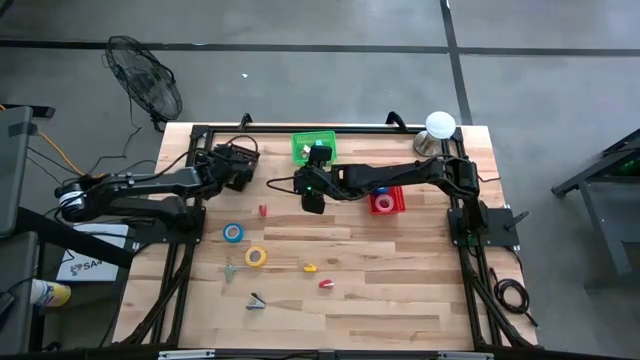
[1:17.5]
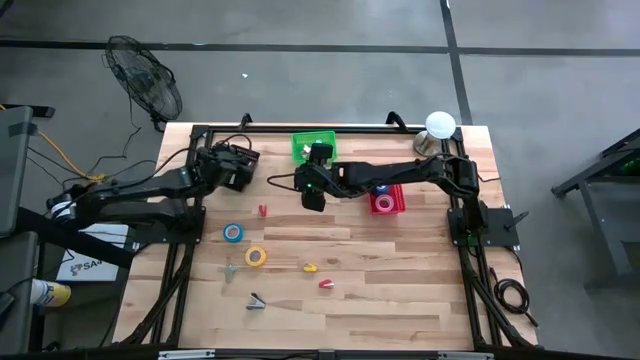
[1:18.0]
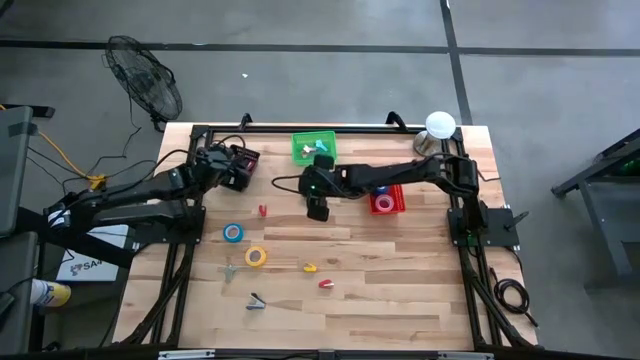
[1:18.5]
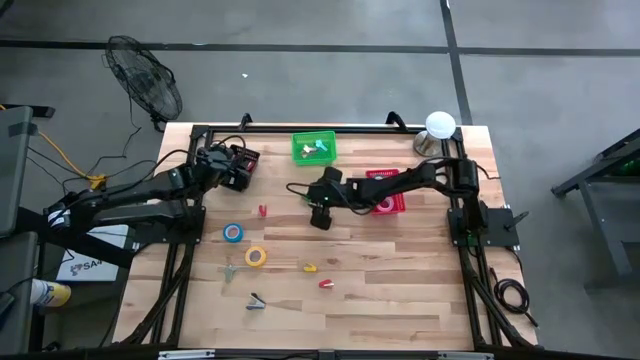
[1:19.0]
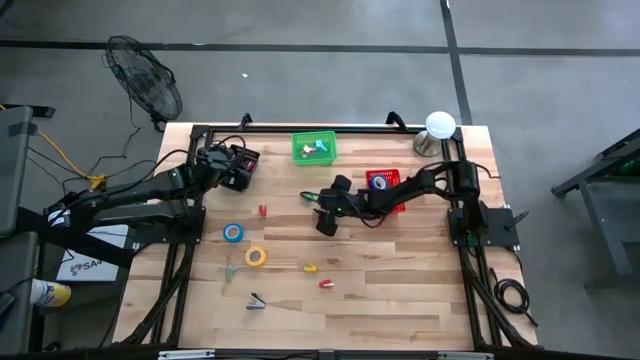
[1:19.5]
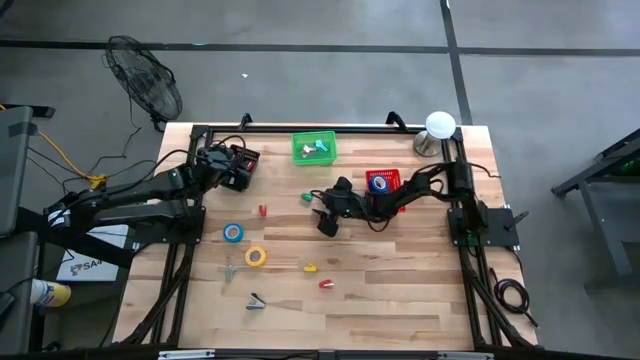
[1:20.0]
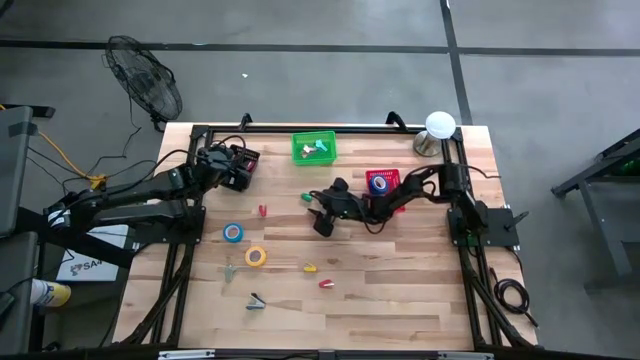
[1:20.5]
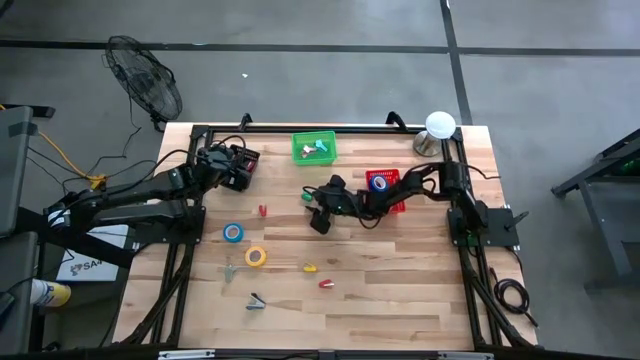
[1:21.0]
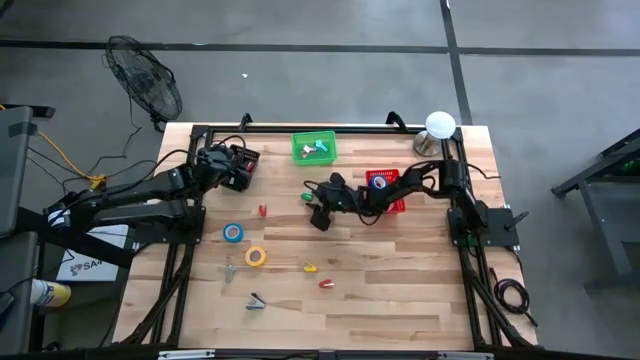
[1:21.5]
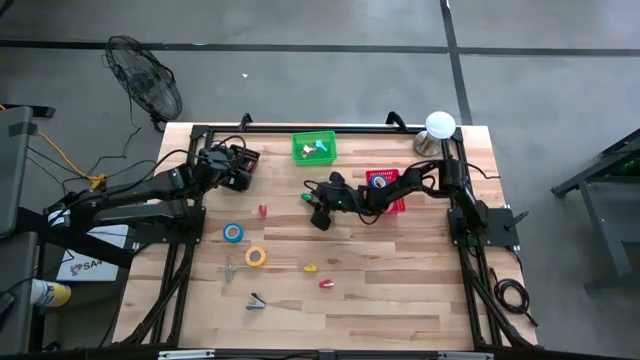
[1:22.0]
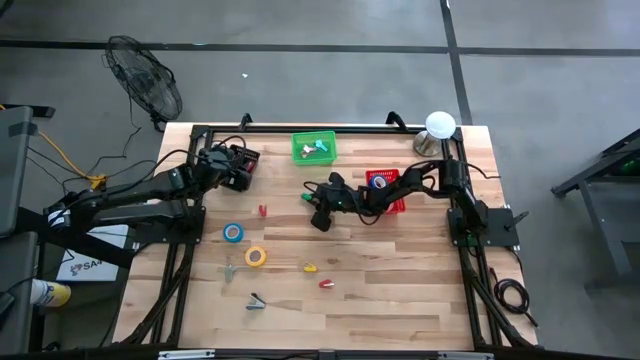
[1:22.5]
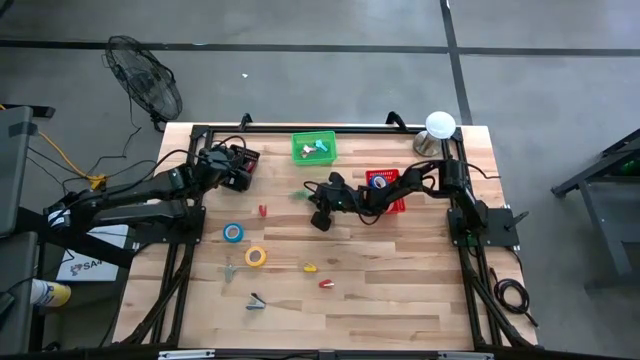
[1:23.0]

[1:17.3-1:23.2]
Task: Pick and place Stapler, Stapler remover, tape
Put the green stapler into the black bin

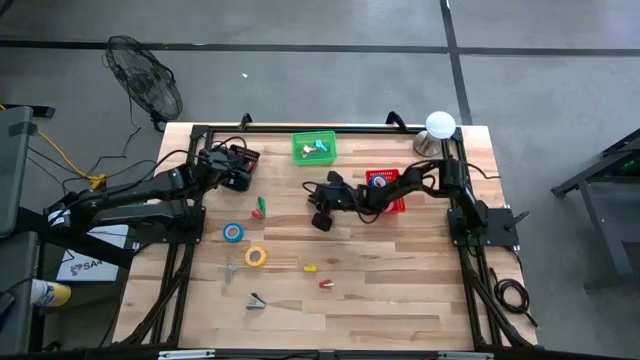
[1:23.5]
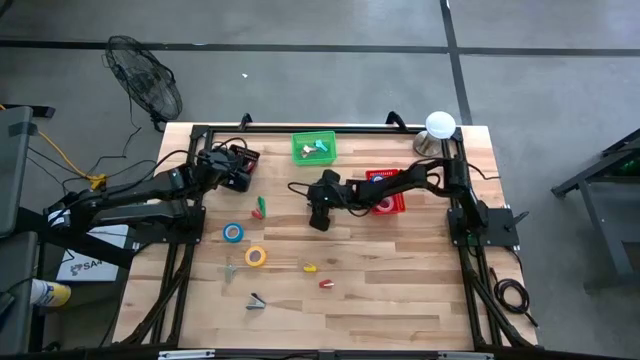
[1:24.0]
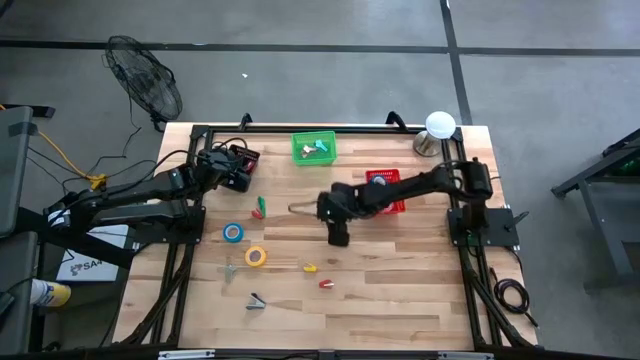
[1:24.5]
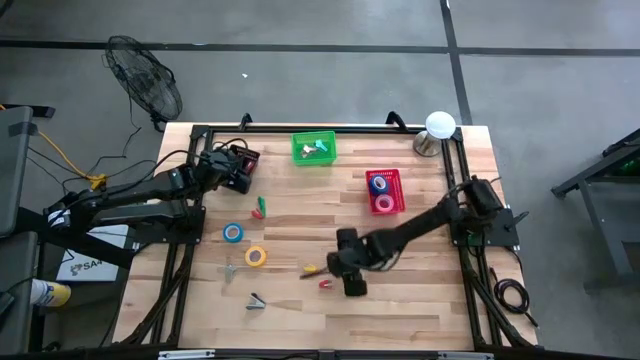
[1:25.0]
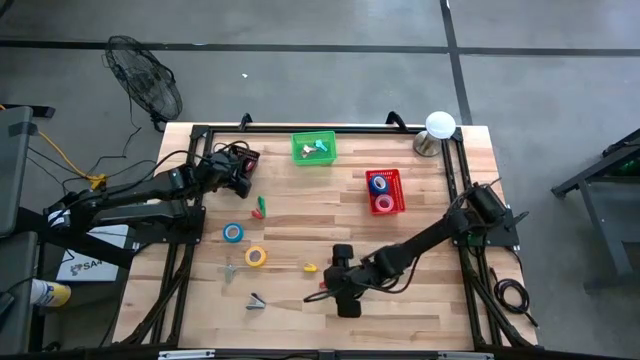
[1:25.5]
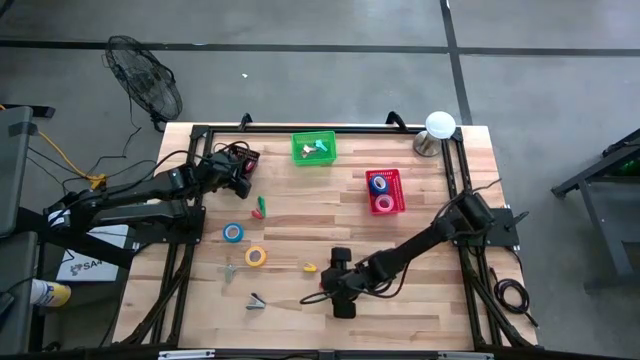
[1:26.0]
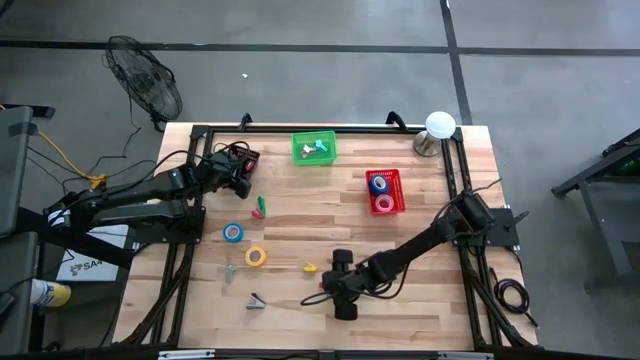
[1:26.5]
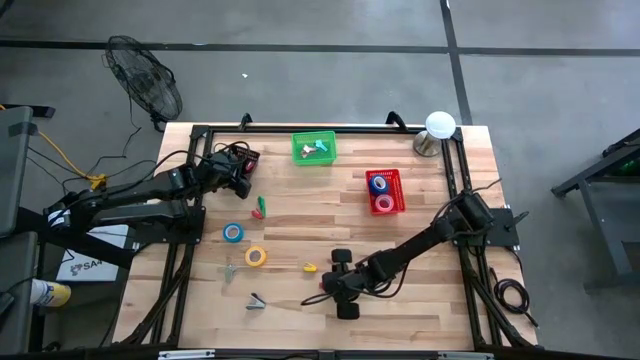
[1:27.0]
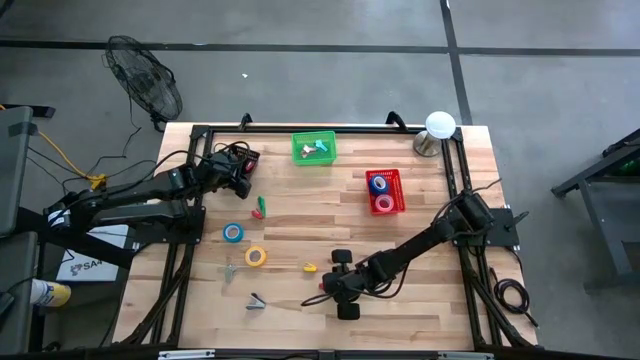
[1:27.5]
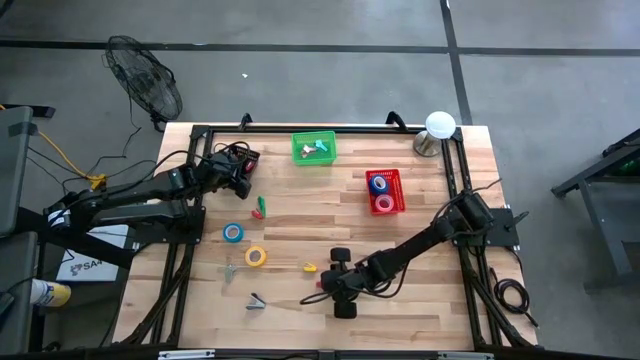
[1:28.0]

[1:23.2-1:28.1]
Put the bottom red stapler into the black bin

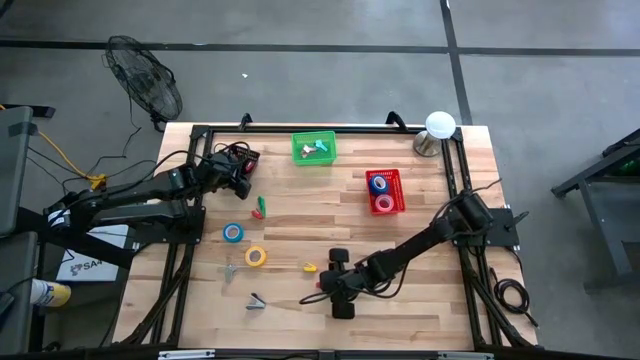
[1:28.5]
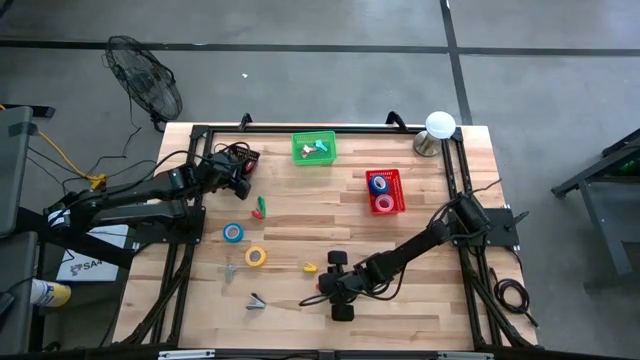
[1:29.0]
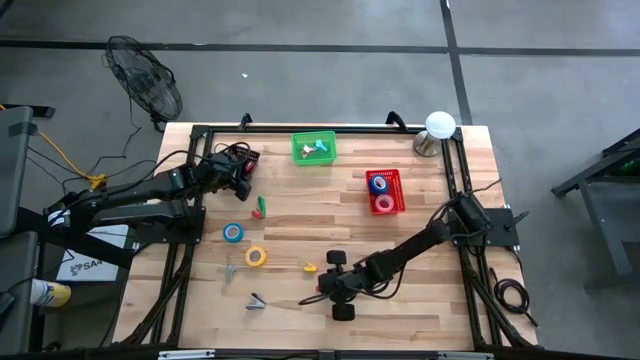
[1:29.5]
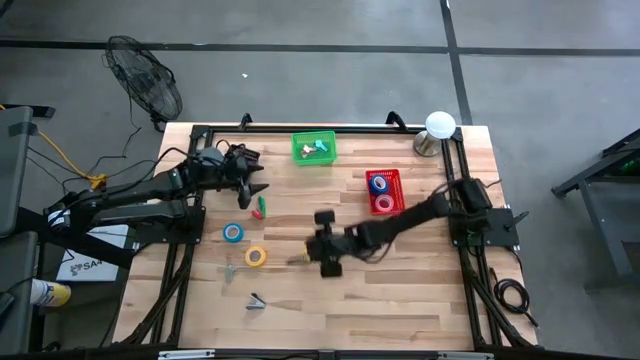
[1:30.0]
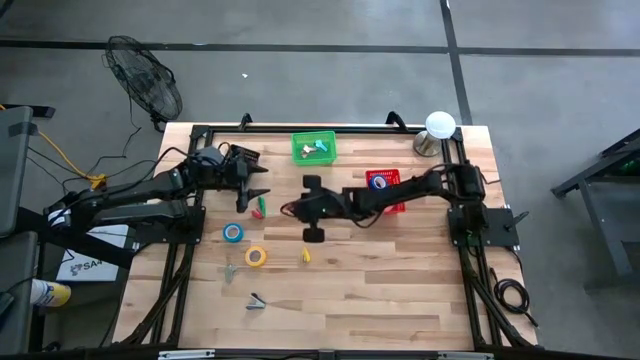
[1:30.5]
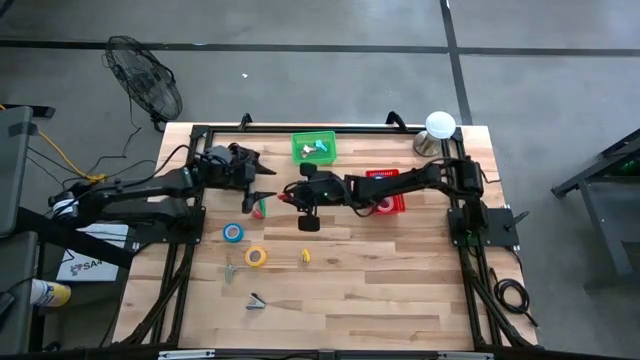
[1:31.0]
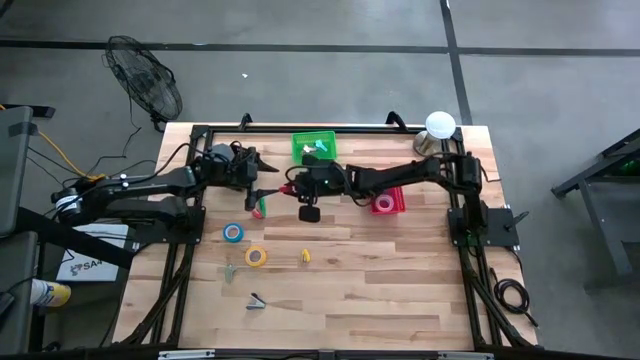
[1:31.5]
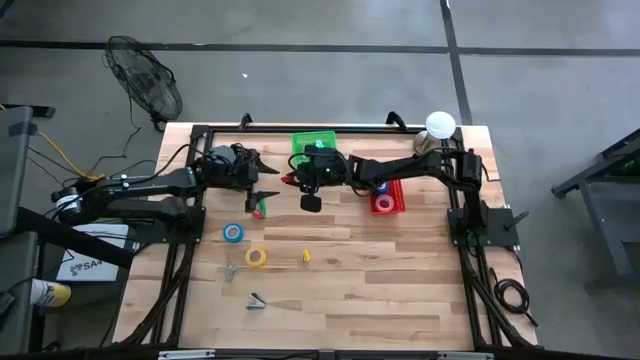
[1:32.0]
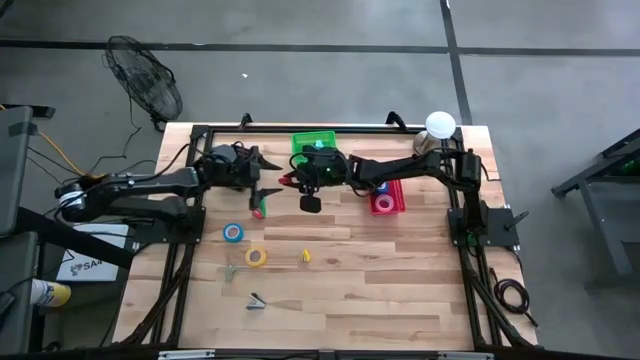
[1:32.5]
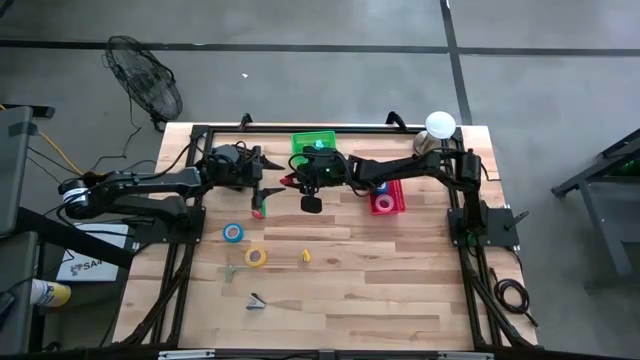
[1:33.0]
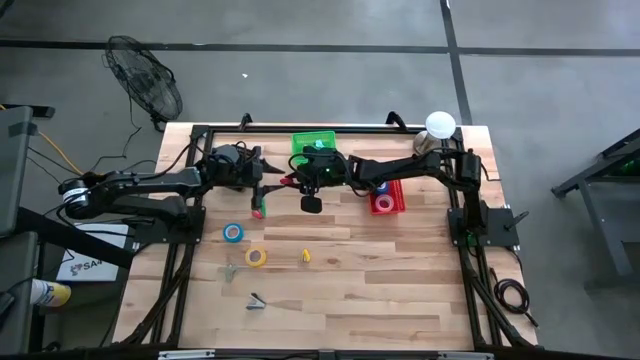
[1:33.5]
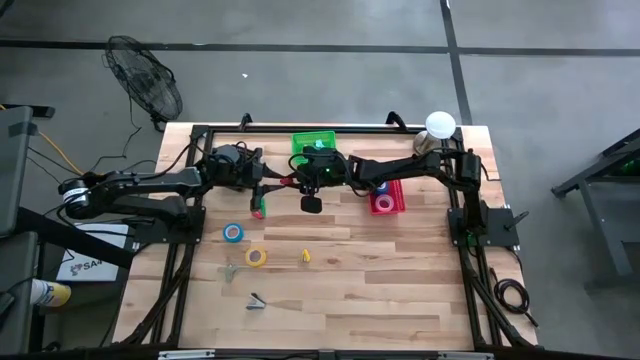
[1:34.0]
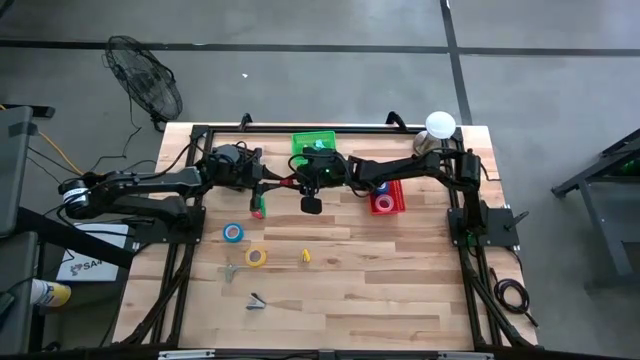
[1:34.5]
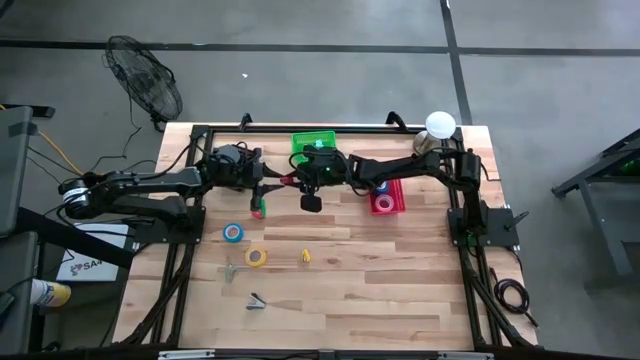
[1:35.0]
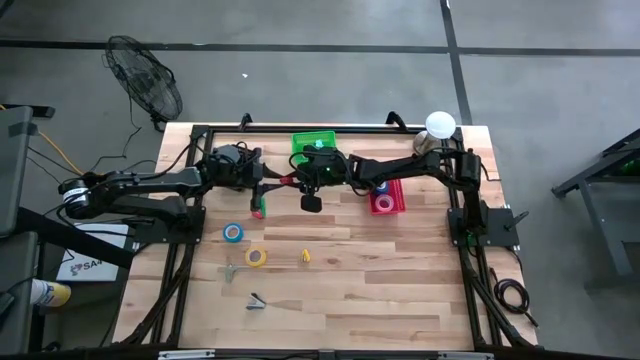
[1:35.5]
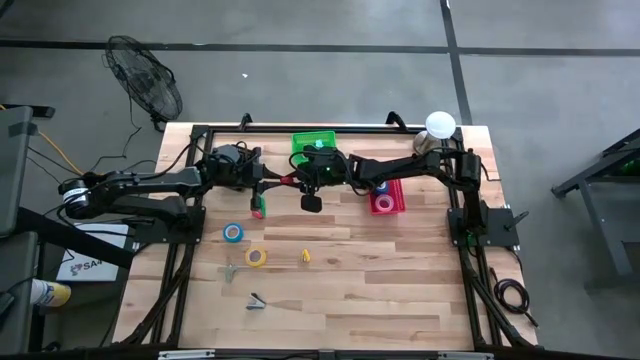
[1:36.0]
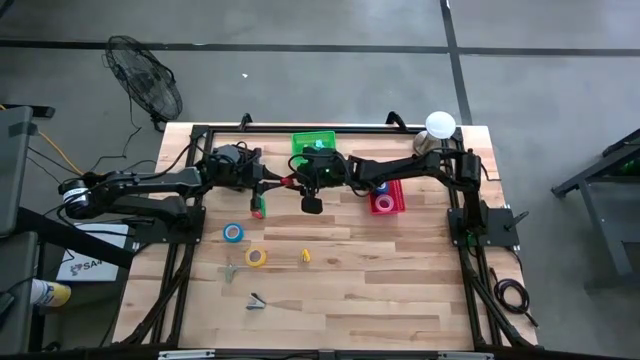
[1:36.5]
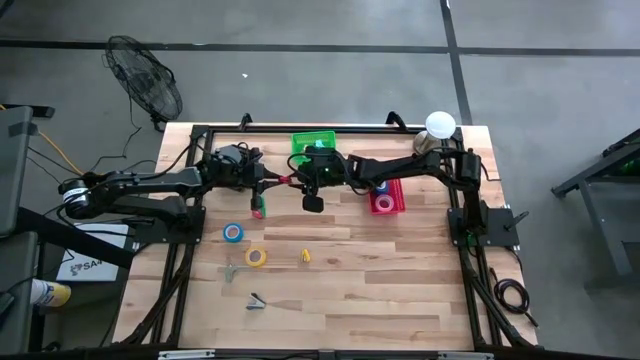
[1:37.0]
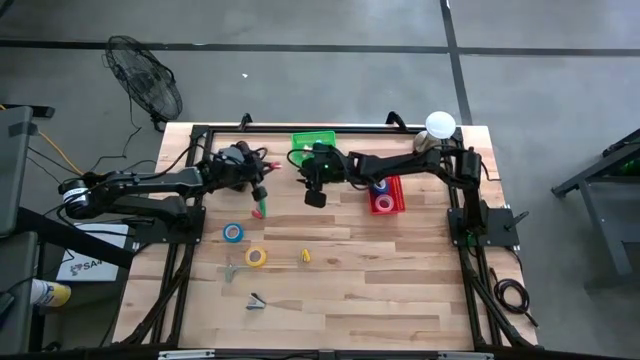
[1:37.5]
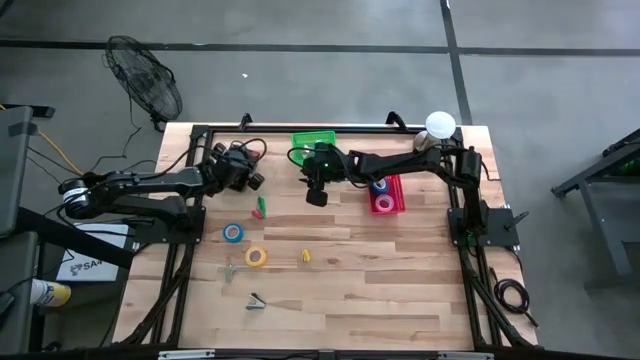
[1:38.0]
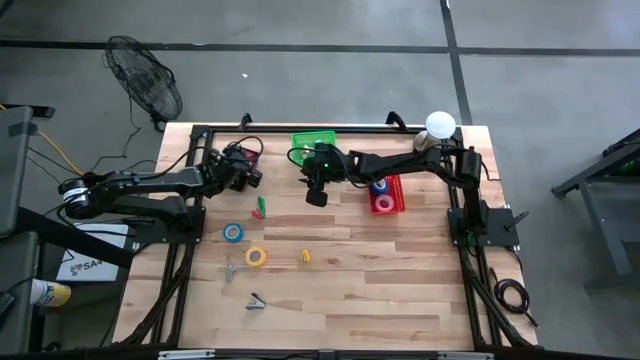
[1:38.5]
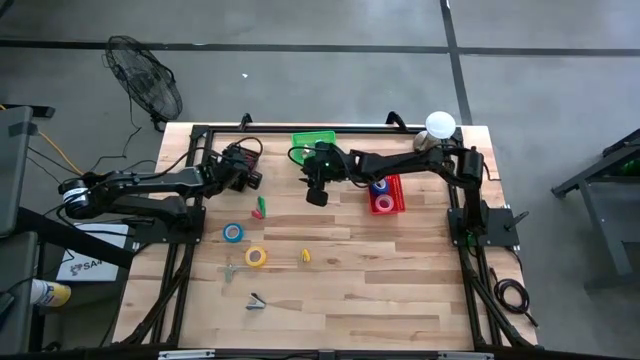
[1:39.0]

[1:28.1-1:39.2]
Put the bottom red stapler into the black bin

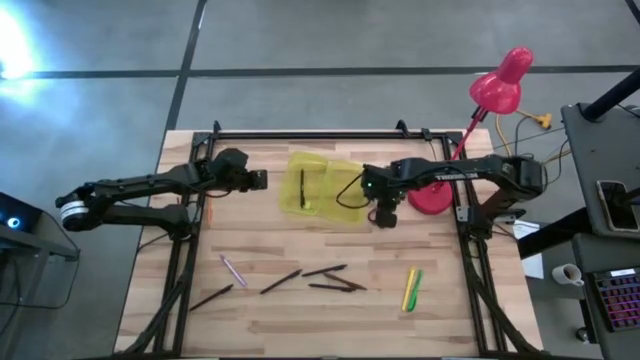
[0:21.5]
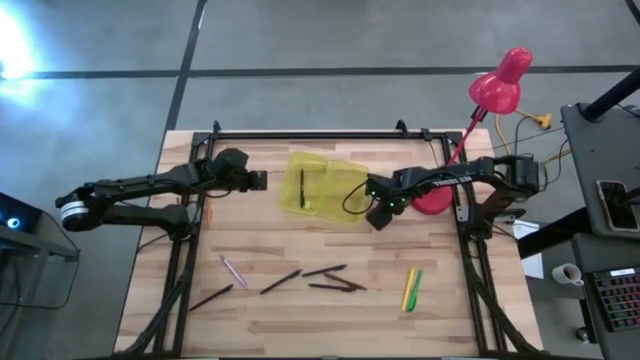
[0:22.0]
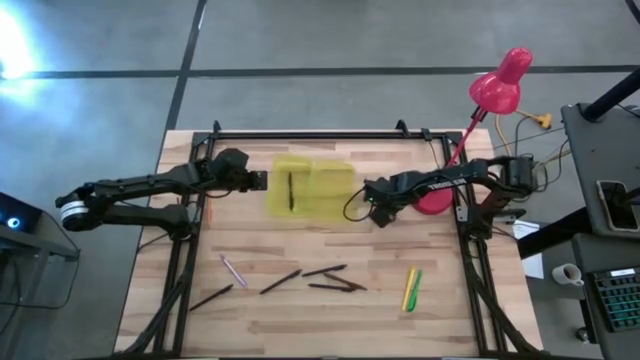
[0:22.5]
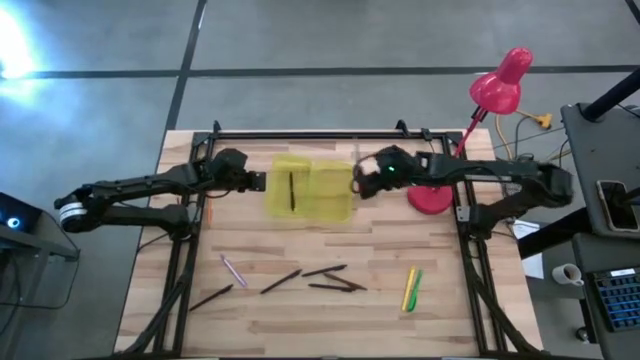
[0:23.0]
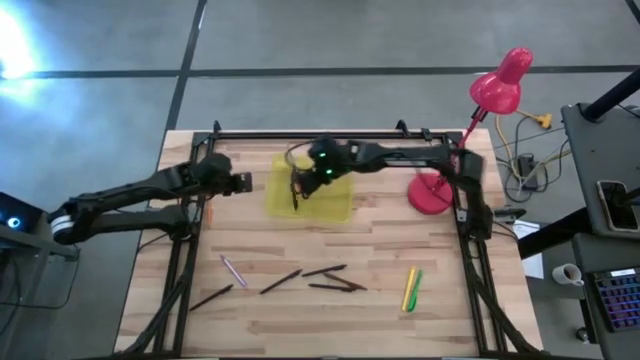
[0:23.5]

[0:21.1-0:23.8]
Task: Pick & place school supplies into a supply box
Put the scissors into the supply box
